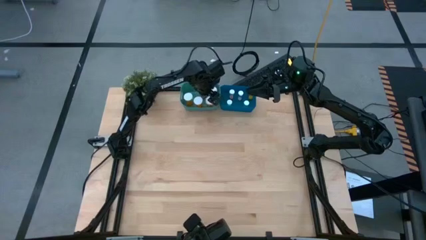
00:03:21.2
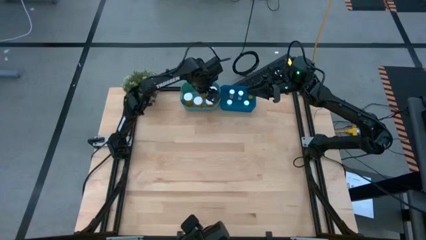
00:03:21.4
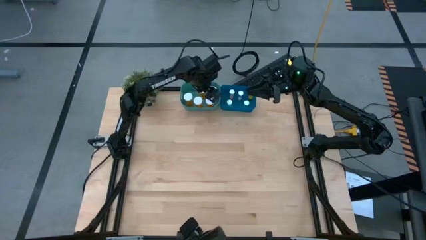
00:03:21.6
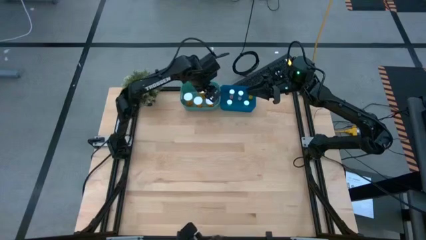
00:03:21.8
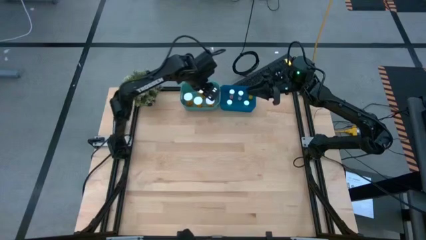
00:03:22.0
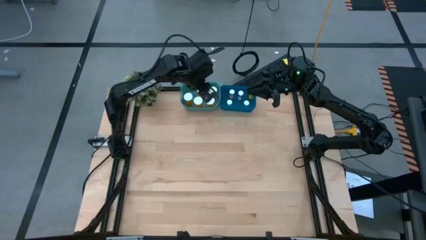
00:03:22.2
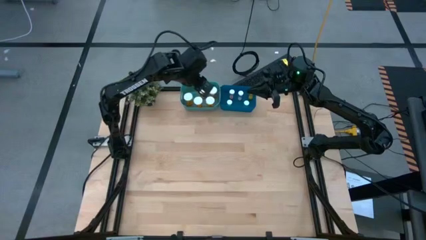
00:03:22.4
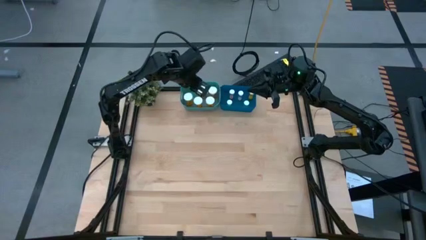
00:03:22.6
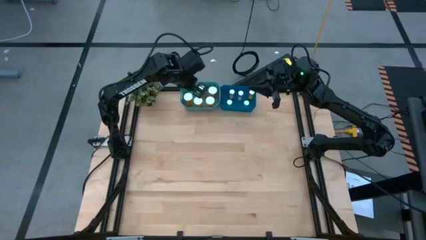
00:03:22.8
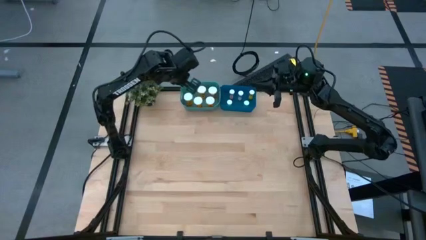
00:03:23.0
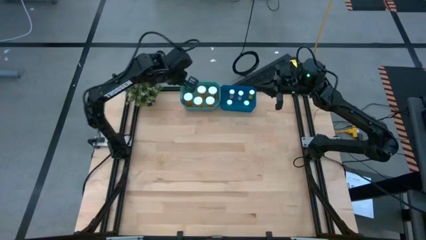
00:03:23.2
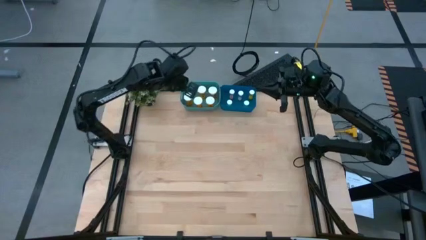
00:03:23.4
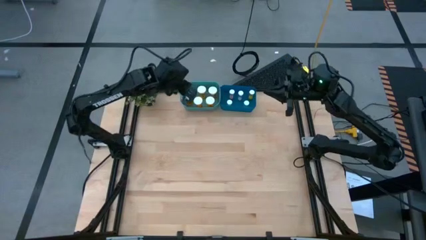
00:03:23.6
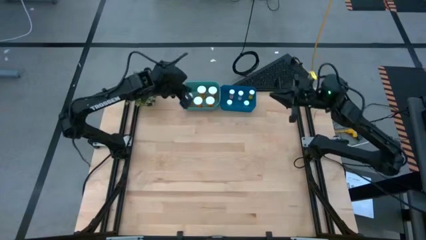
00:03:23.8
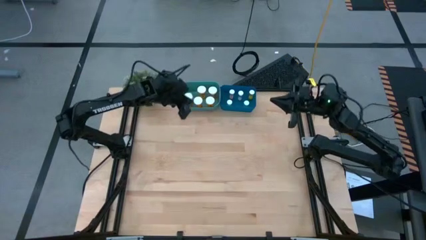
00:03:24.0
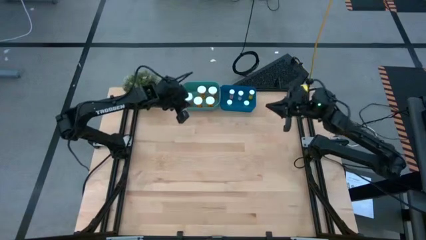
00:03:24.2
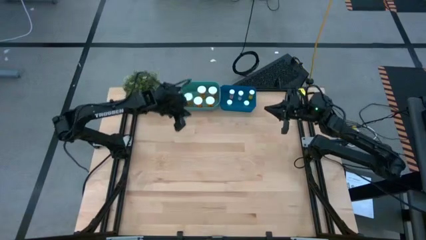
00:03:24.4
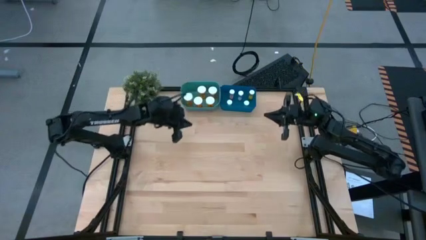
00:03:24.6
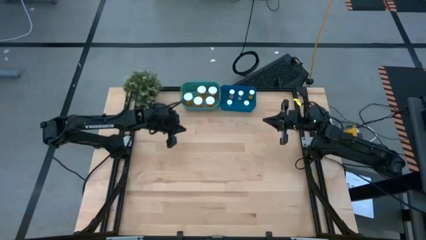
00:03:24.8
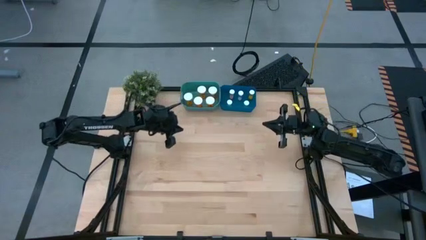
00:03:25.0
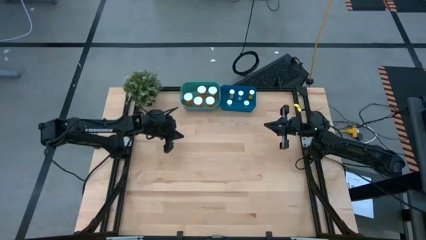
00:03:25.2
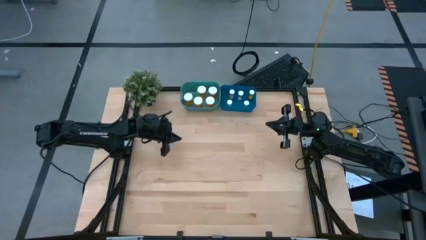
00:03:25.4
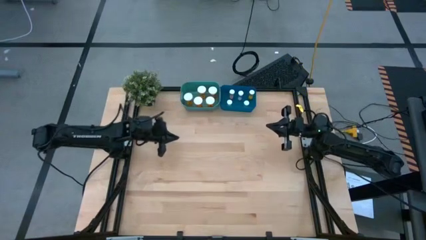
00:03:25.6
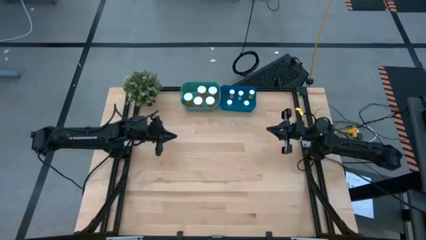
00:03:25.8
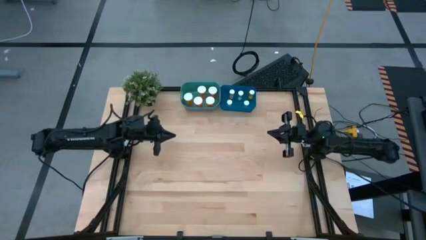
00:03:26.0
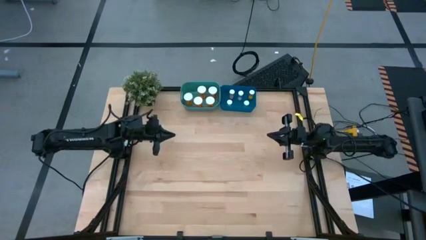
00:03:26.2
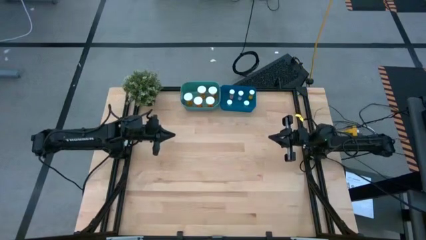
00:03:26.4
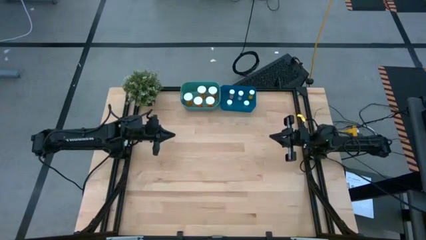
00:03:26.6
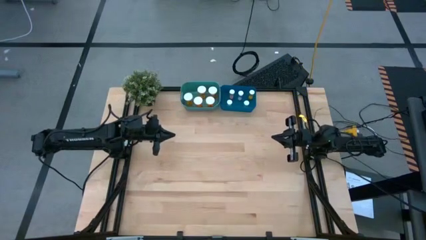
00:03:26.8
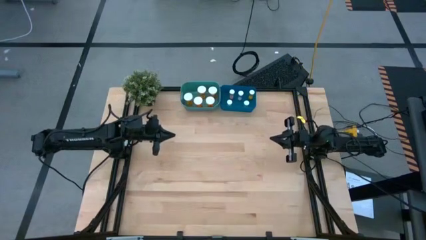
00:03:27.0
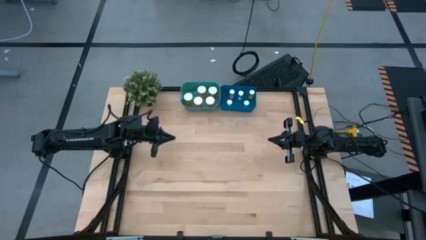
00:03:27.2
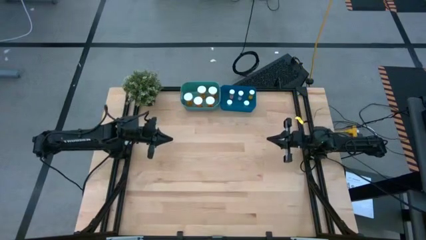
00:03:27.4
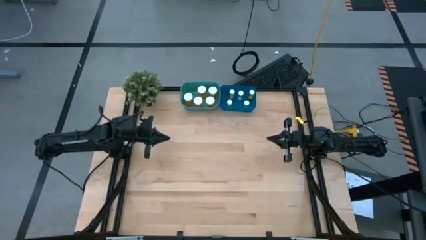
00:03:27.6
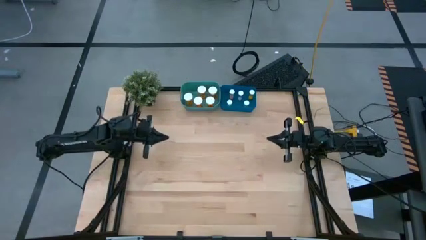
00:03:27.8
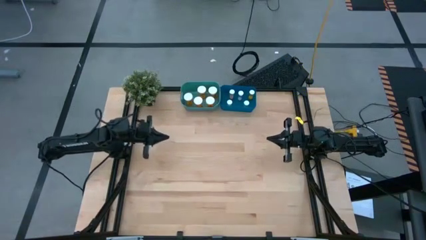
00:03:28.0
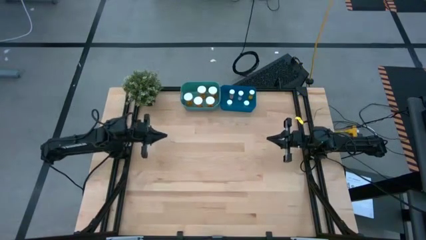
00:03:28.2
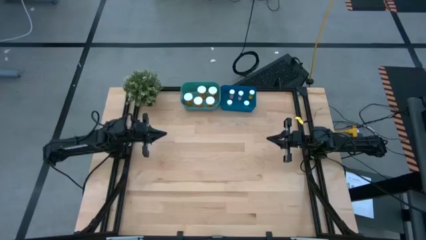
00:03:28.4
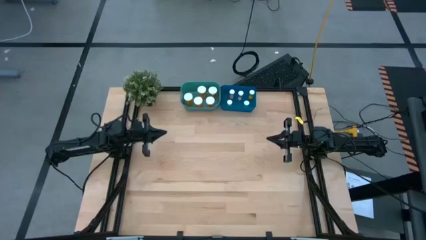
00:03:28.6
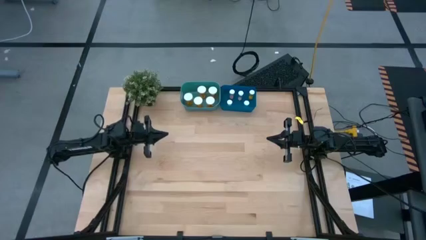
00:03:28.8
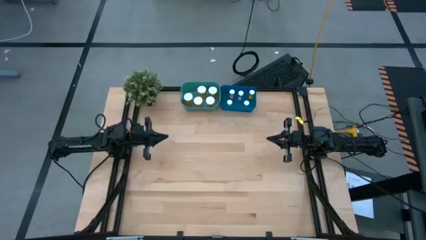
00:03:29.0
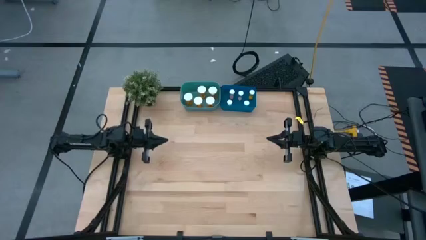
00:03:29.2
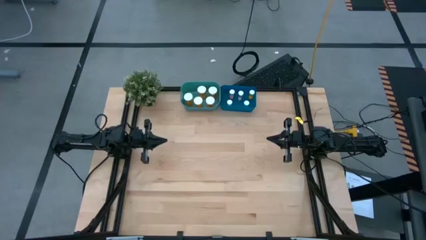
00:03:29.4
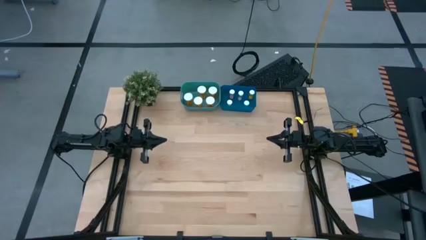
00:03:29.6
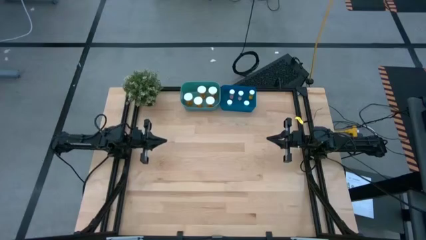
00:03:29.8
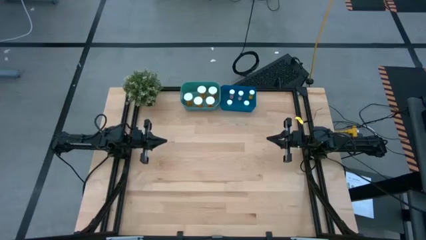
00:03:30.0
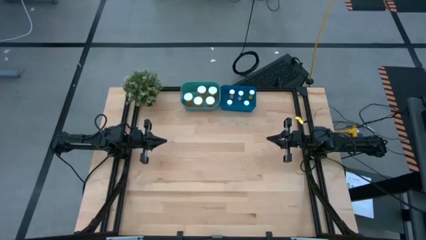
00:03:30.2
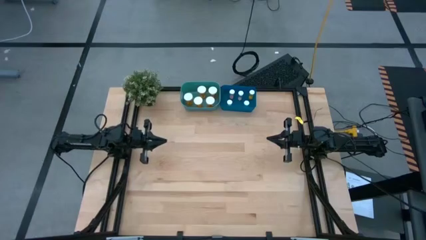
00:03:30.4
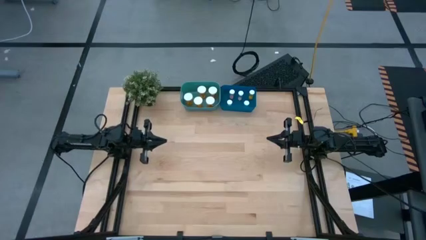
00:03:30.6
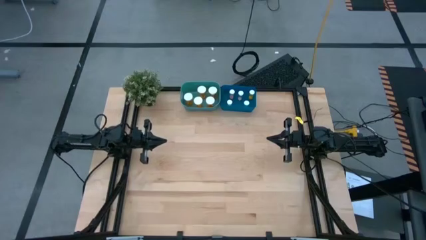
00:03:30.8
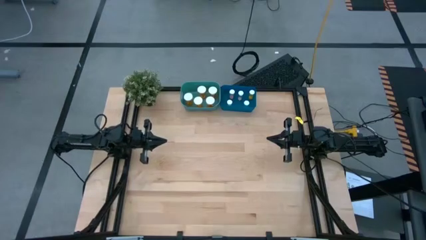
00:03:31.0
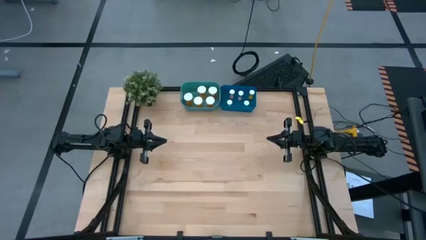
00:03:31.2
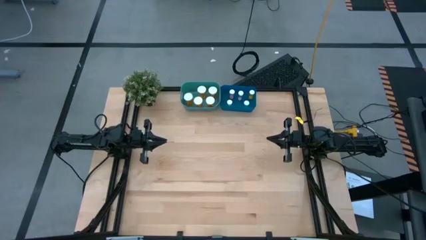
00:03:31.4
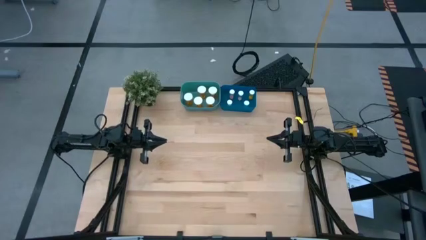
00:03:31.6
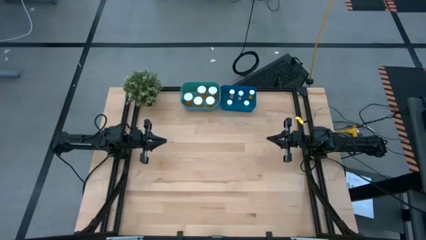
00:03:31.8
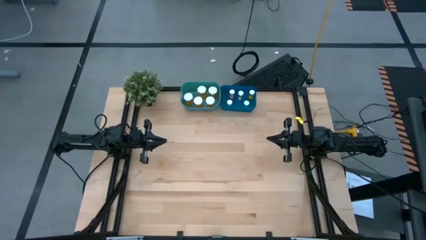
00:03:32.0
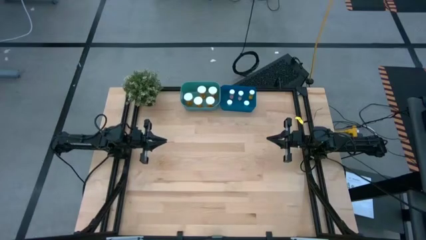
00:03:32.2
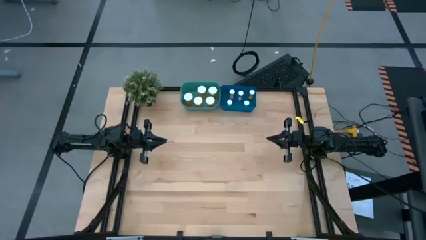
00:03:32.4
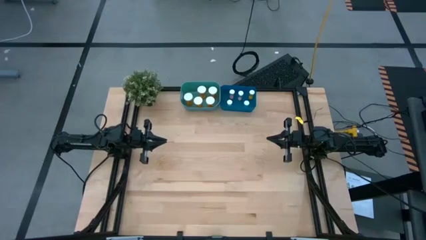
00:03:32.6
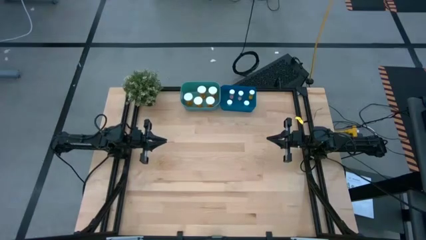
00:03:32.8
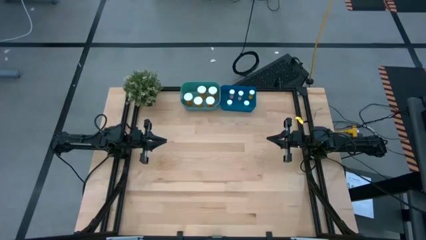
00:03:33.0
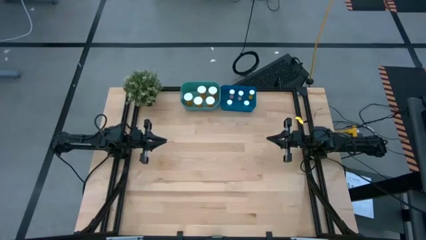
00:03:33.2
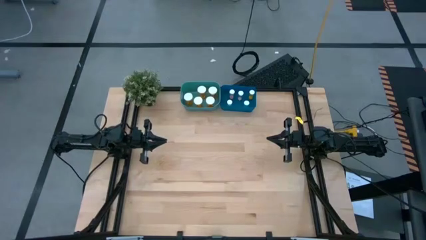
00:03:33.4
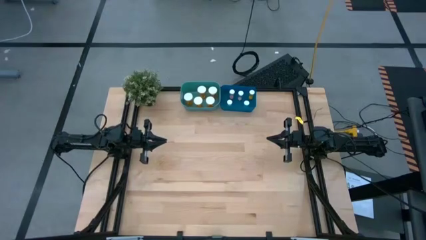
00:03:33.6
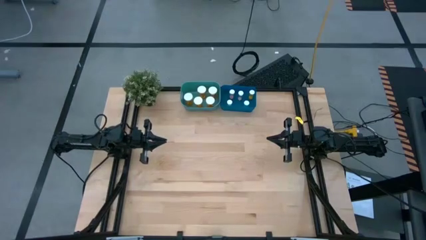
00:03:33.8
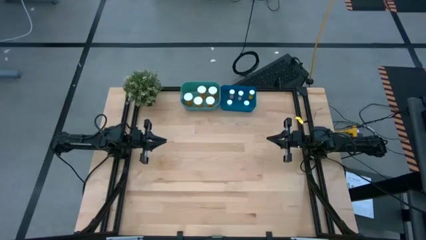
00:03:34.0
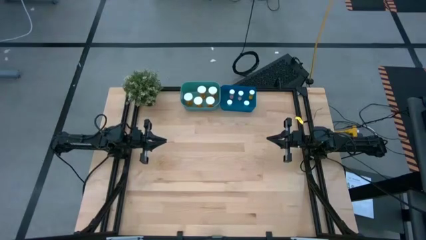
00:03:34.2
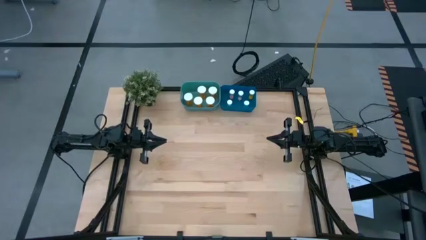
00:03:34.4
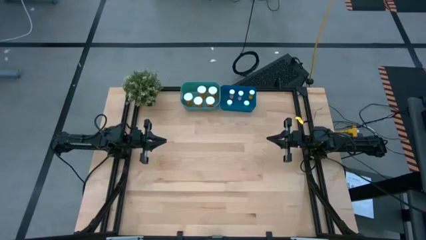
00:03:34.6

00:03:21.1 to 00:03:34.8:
Task: Pick and place medicine bottles into bin by pill shape (circle, oval)
Return to Home Position

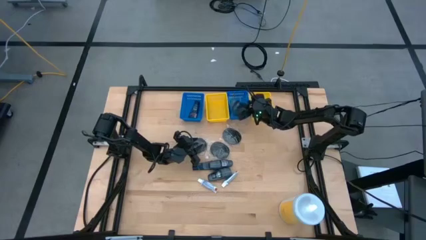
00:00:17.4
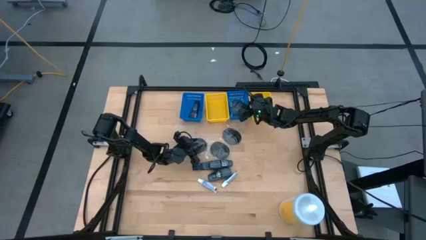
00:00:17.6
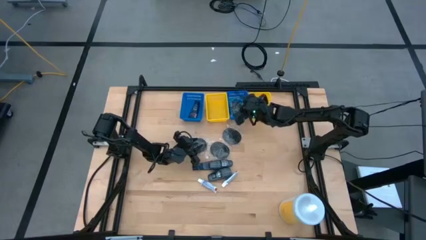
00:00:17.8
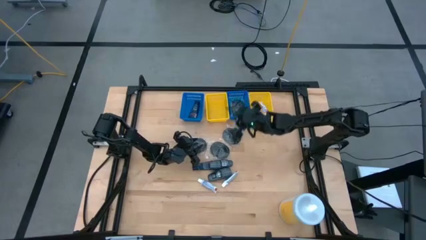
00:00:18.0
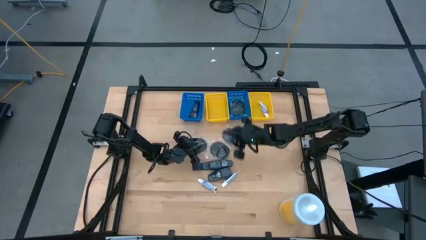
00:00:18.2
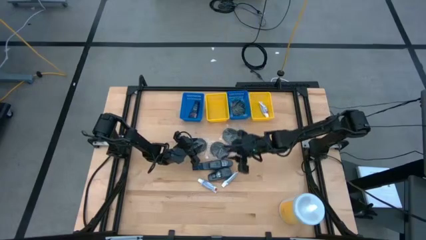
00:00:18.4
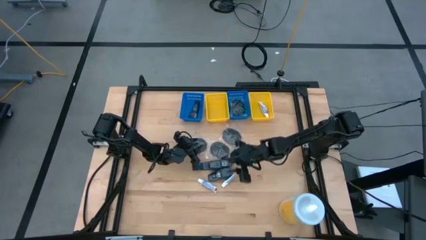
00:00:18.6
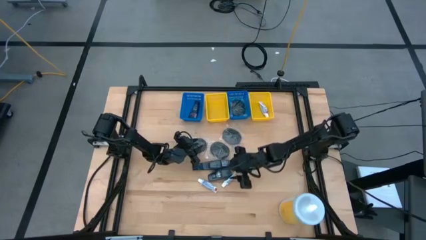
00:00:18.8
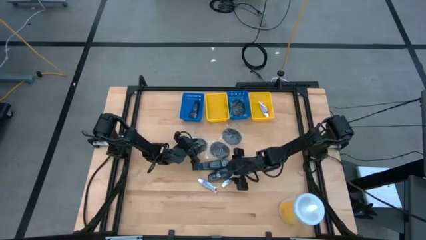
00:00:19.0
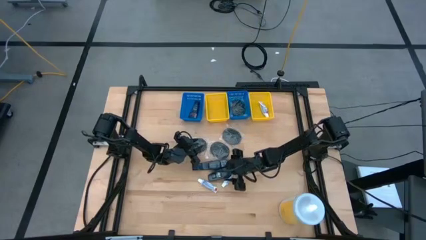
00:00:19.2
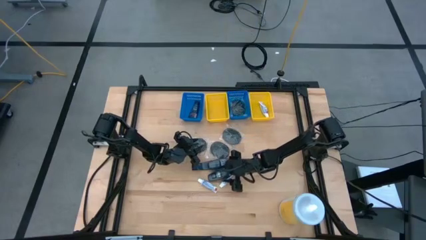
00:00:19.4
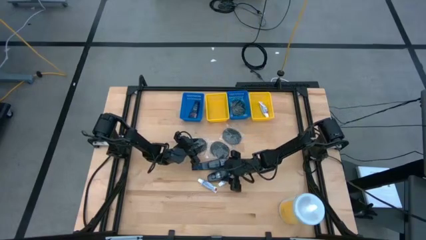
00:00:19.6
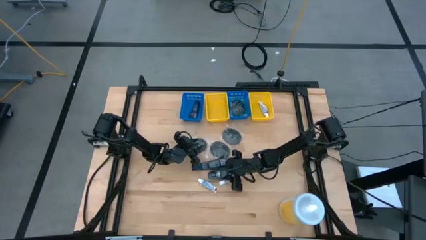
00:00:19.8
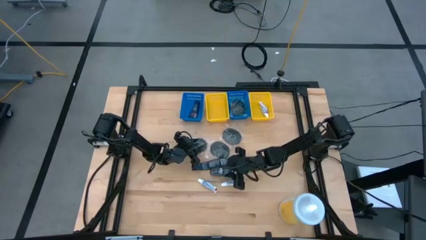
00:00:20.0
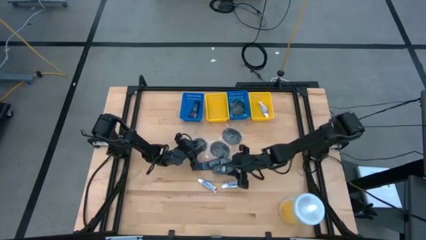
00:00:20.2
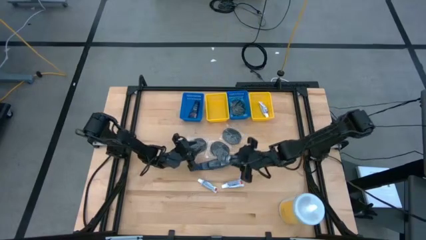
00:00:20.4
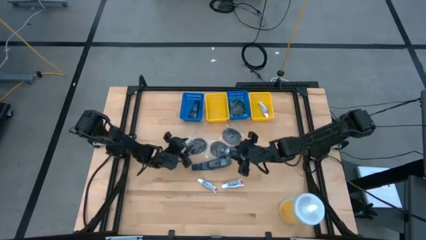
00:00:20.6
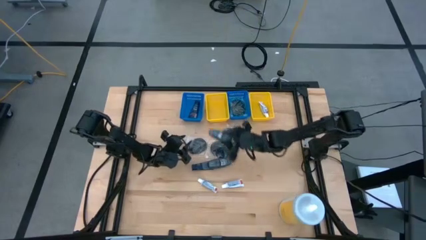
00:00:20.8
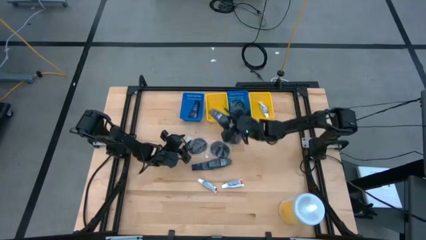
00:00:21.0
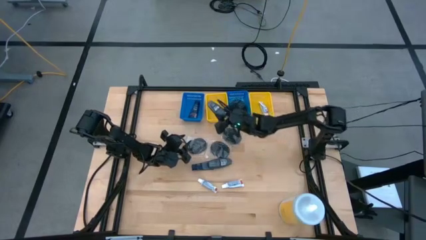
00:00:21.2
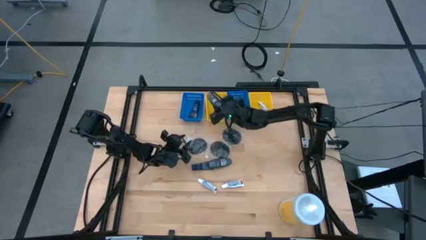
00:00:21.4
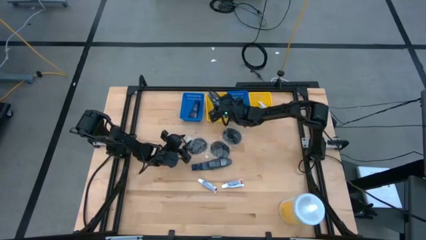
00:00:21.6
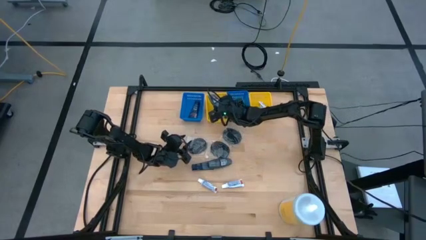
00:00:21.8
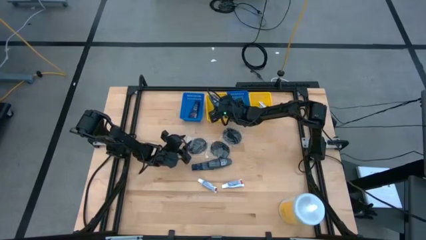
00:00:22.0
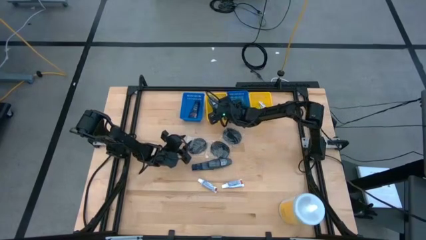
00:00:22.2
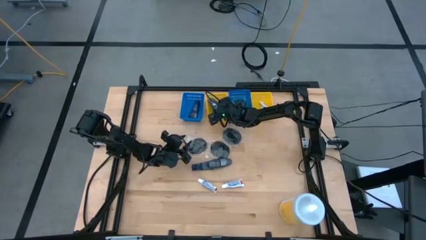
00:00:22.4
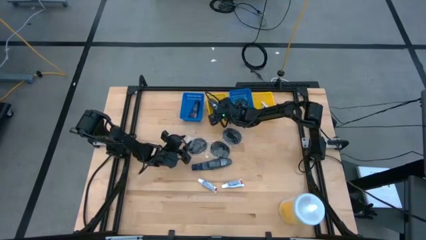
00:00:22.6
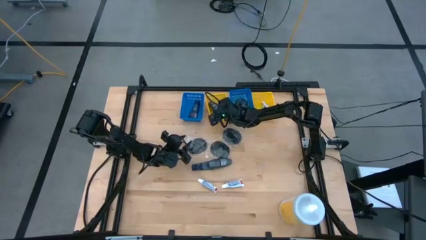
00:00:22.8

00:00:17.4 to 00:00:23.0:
Task: Pick & Place Travel size toiletries
Put the black deodorant into the left yellow bin
